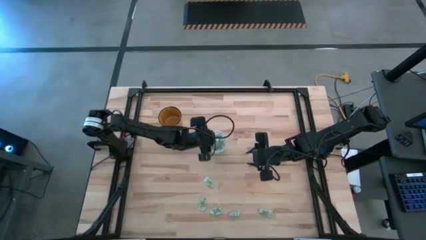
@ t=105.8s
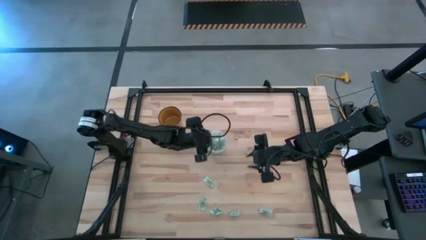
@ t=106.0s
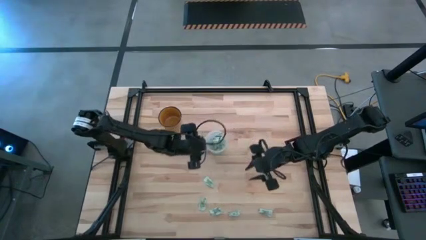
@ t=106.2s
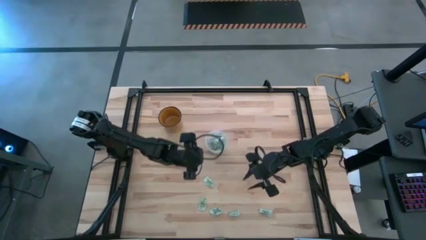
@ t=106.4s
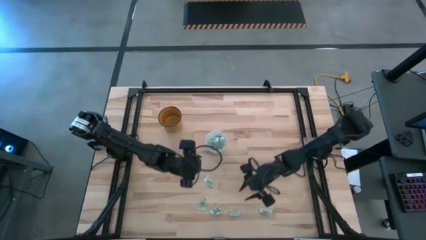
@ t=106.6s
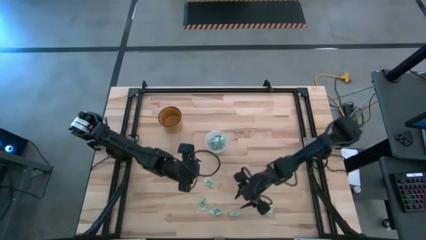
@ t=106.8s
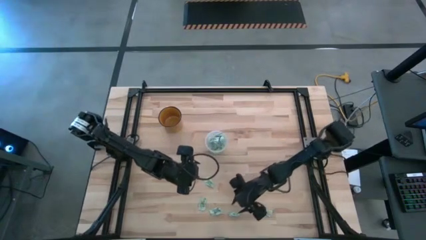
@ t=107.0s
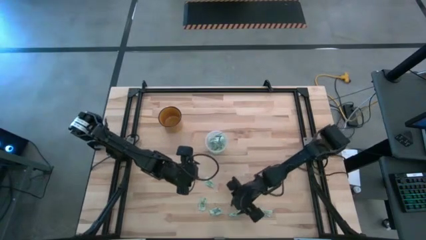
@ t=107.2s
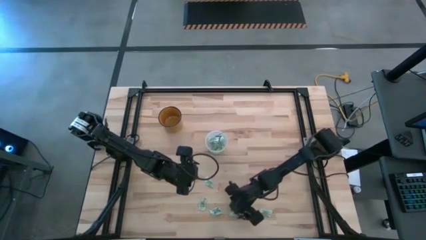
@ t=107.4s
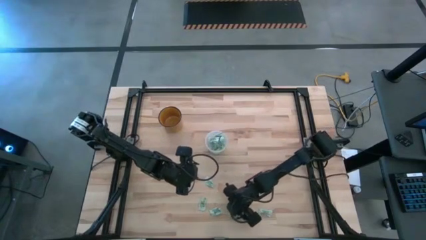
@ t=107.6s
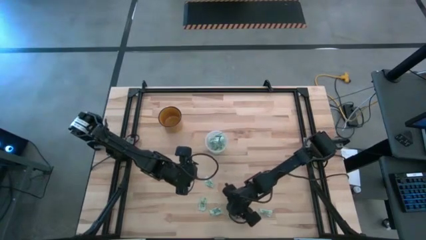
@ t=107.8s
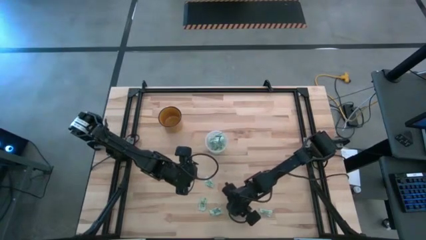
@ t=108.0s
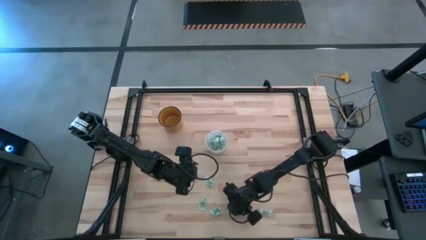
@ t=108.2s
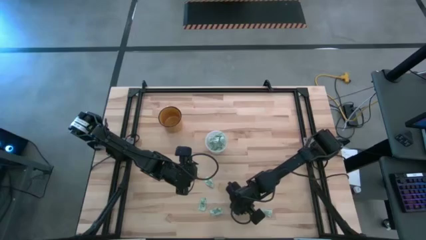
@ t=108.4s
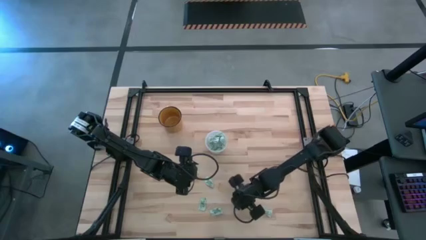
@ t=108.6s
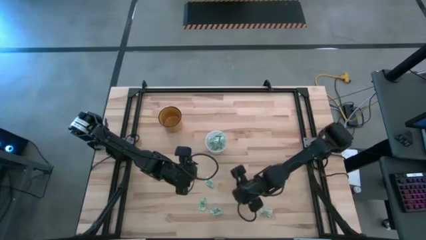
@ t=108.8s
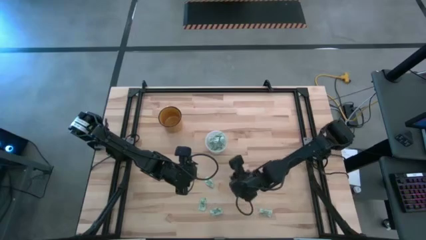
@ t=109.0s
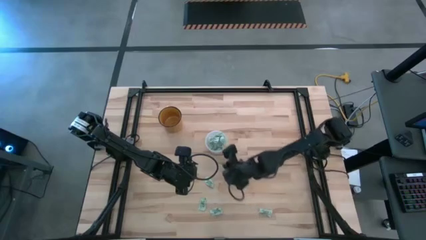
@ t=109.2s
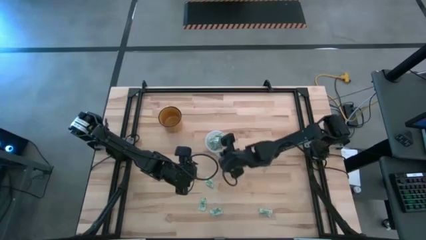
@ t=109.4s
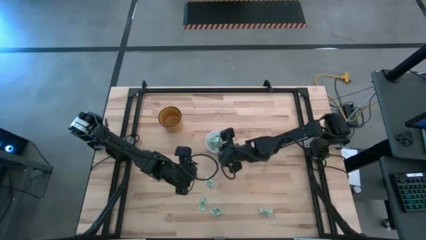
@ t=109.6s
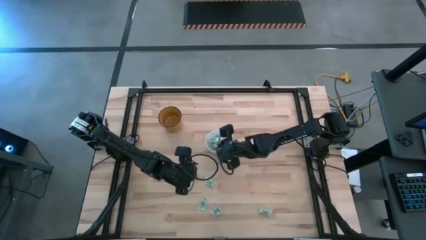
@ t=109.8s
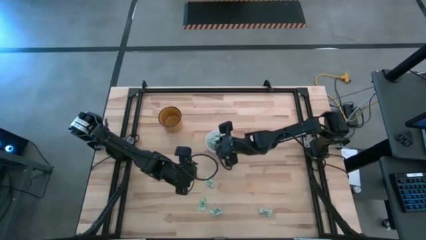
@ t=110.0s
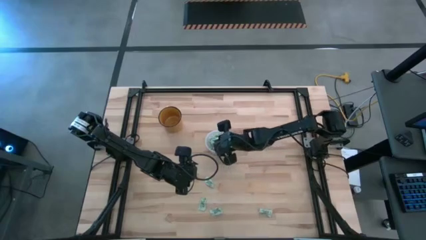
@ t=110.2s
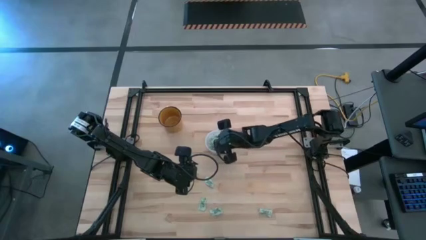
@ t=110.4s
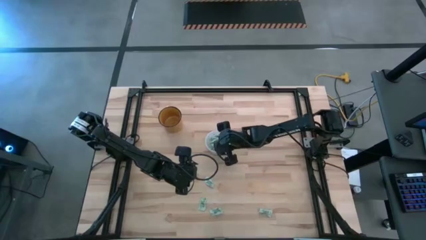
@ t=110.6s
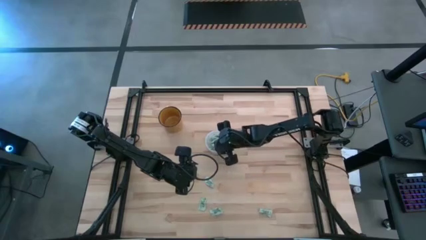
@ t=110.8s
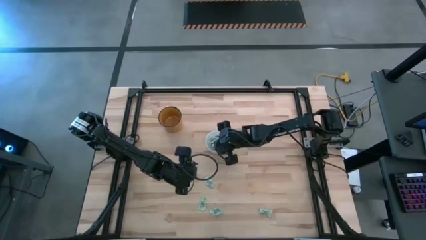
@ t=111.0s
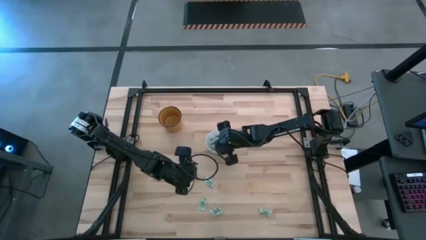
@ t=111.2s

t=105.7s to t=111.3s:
Task: Pick and place Stevia / Truvia into bins
Put the stevia packet into the transparent container

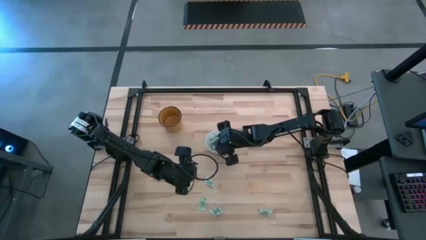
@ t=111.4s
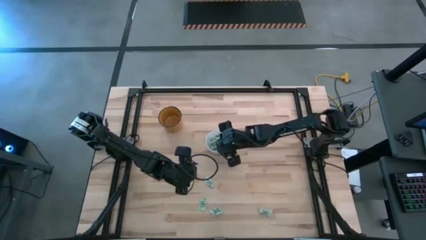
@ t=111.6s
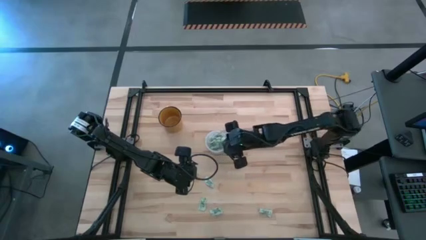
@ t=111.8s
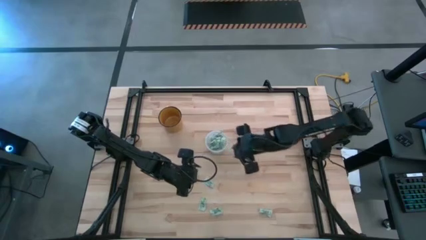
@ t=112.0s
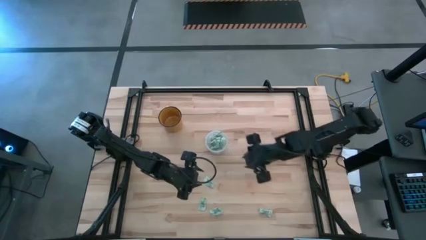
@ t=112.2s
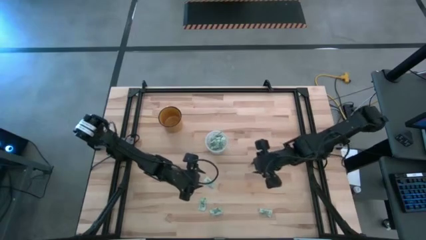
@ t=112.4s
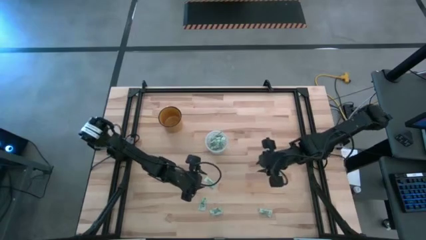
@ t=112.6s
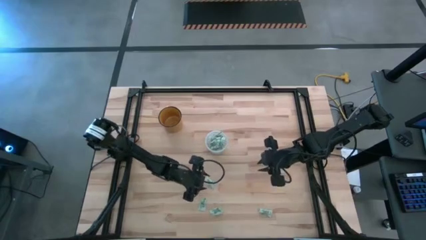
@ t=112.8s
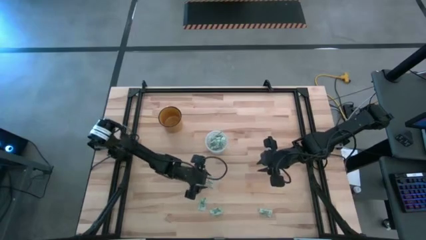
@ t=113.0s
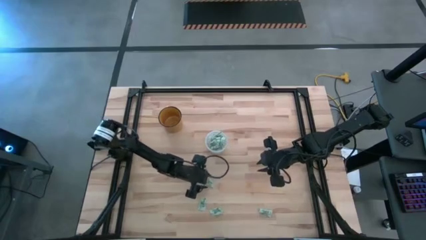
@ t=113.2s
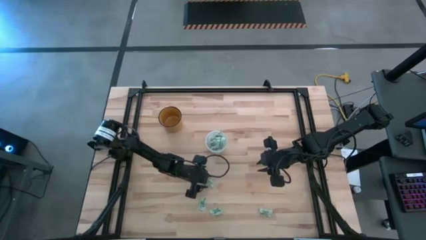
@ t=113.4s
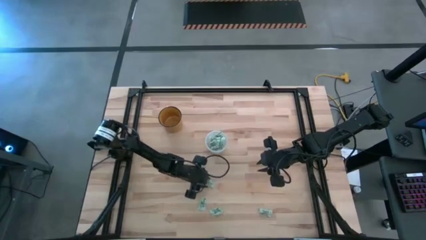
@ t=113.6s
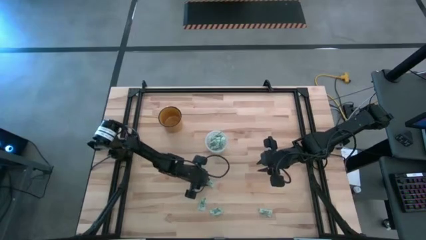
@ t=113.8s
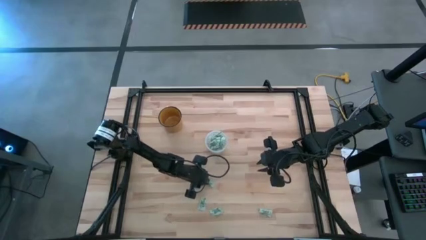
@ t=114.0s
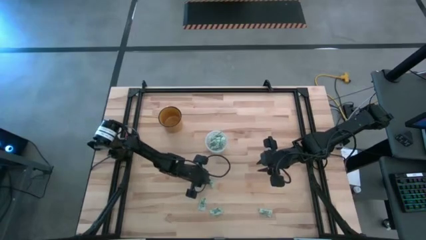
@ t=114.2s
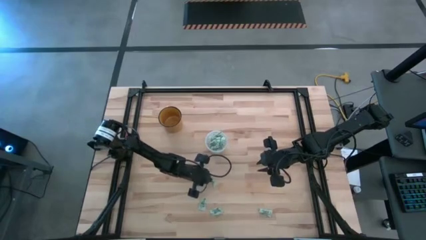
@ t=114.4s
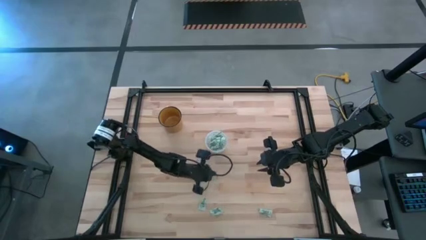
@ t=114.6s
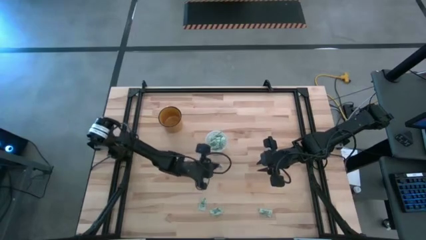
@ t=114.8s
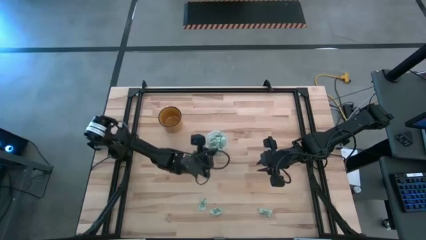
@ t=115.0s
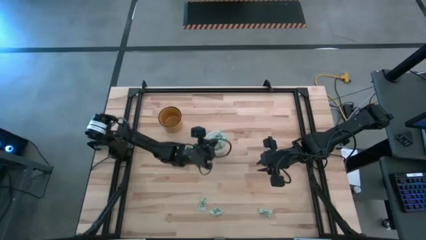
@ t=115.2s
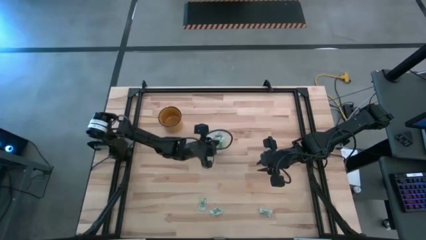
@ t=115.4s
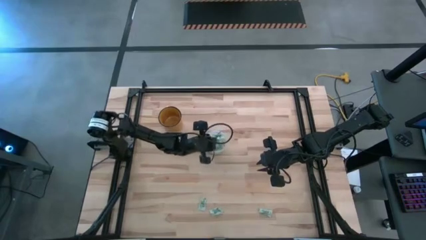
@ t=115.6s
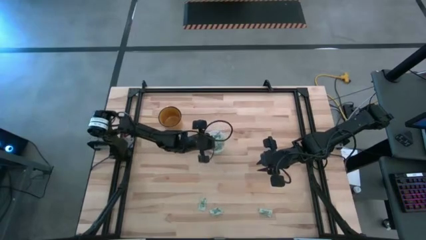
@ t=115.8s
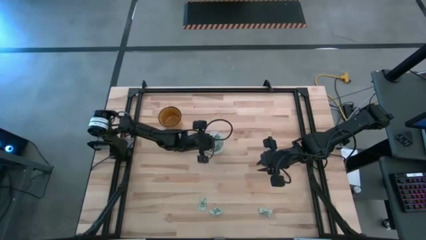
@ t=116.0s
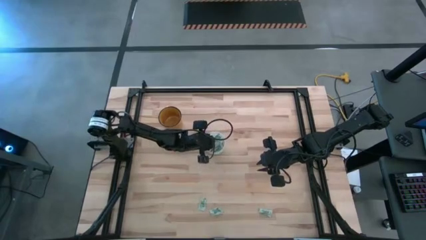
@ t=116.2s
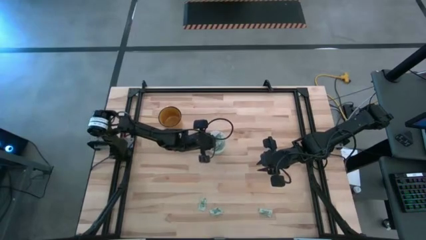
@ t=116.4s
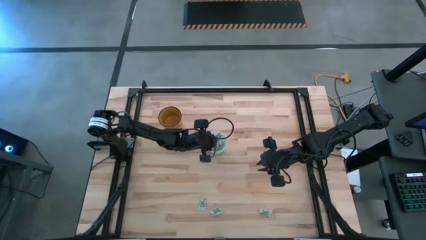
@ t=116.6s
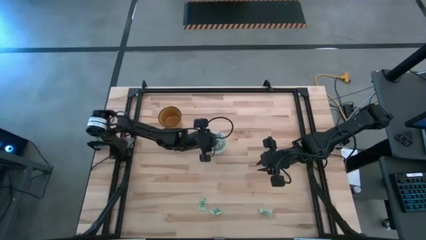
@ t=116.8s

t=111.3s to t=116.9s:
Put the stevia packet into the transparent container

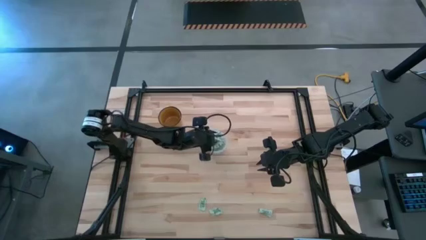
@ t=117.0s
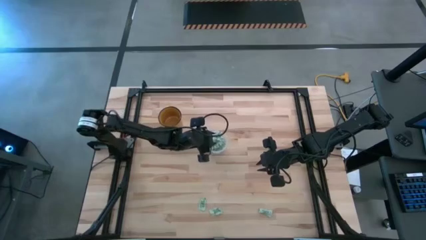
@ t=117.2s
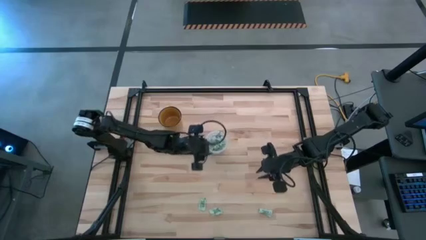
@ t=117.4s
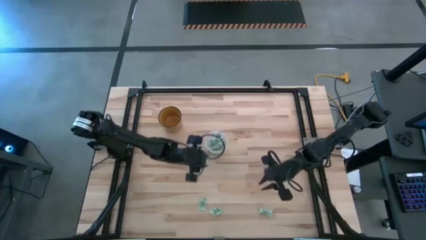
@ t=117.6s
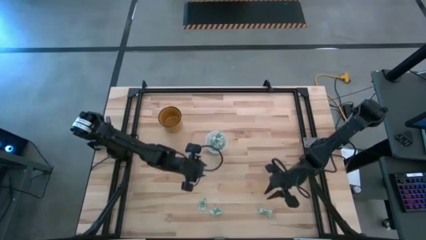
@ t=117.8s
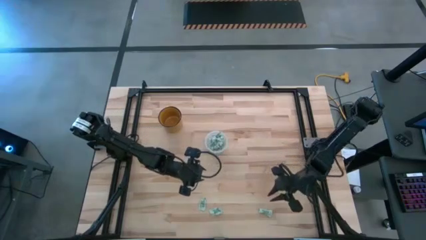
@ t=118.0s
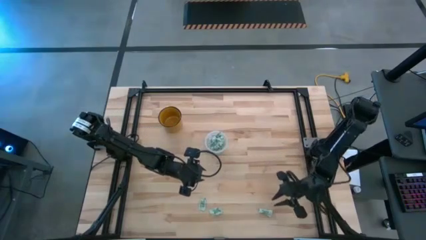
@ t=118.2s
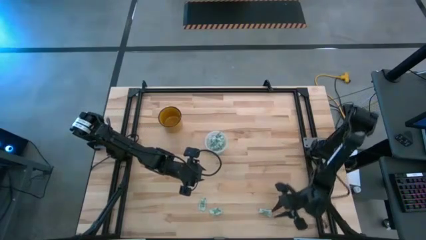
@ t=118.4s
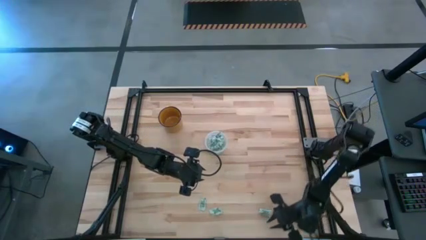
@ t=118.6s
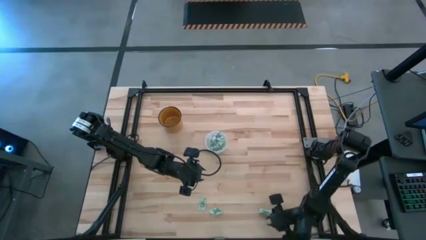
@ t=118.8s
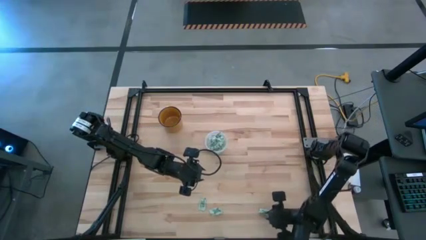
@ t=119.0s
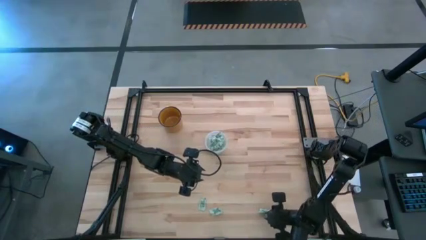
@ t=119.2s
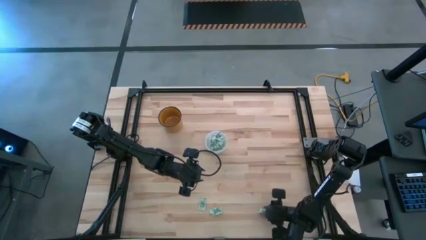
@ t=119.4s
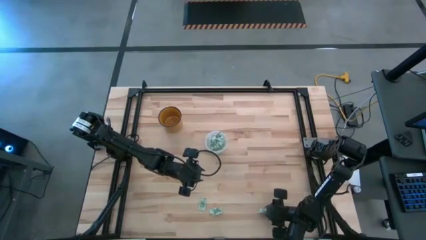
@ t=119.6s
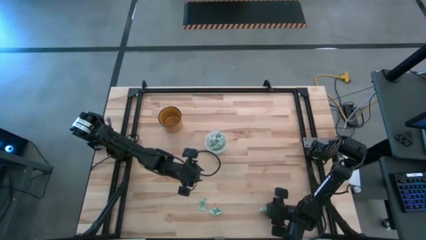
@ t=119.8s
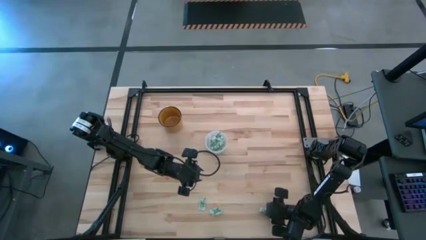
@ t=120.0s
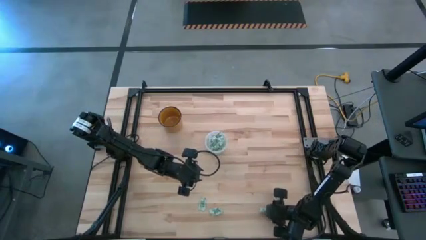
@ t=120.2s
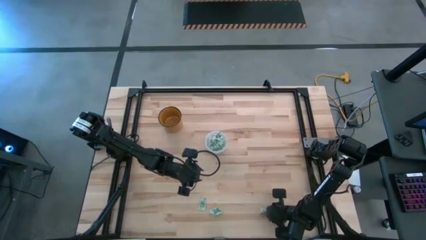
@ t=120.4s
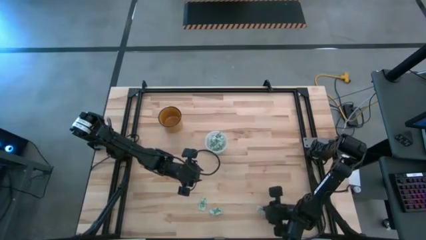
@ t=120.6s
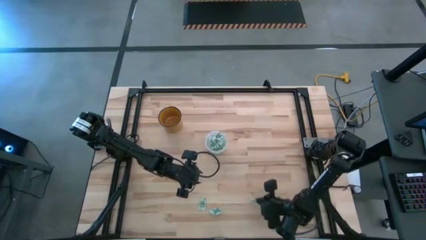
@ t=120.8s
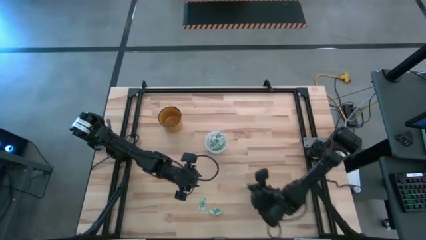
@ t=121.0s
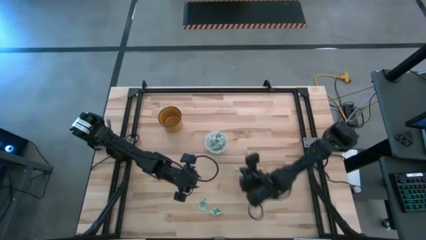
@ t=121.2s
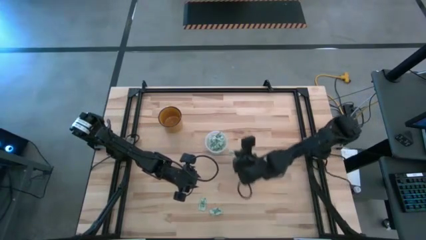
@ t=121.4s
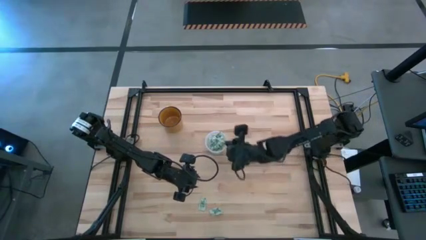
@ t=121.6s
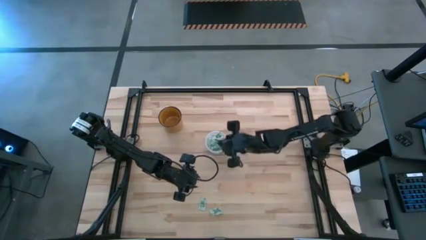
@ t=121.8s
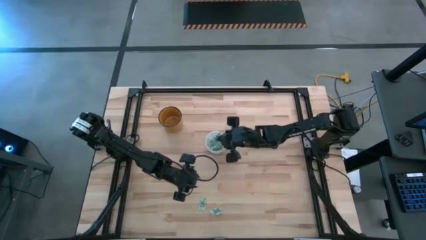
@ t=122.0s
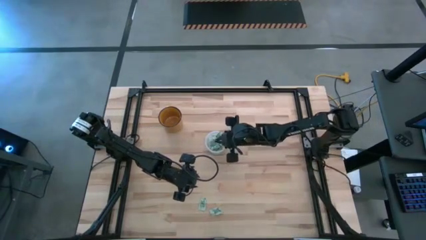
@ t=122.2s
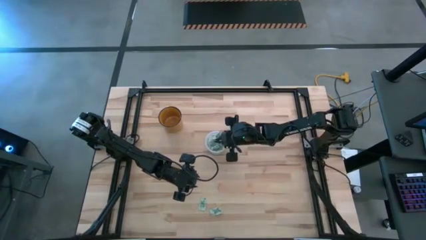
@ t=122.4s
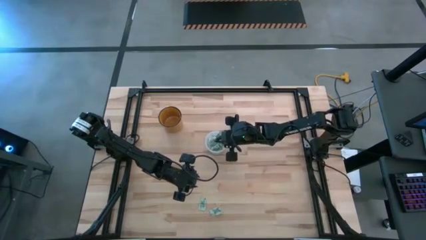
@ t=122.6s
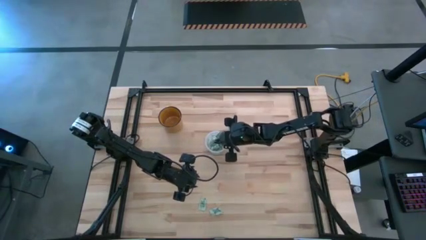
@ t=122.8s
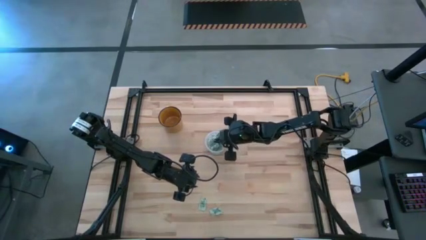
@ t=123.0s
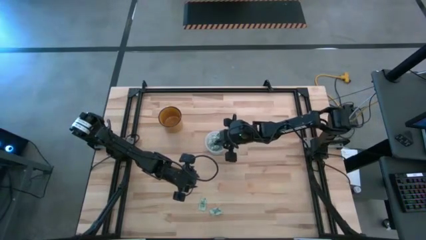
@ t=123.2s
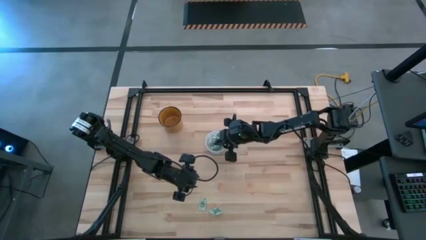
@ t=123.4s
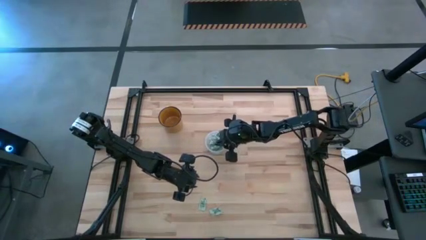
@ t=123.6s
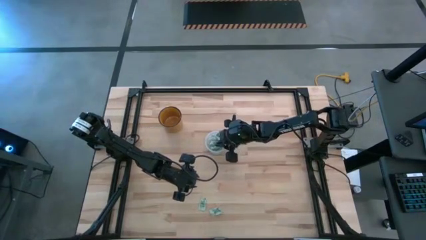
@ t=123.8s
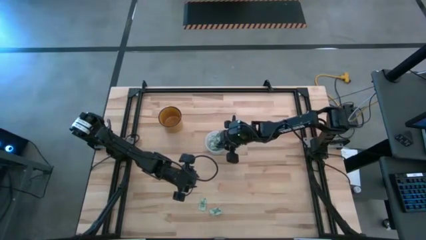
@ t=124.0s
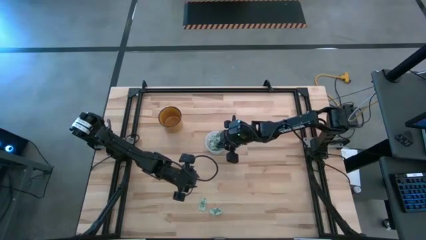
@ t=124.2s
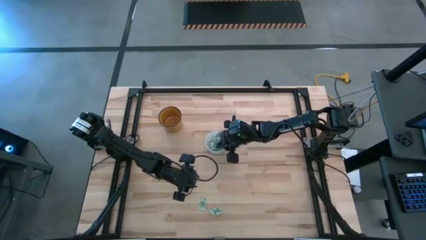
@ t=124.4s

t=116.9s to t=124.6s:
Put the right stevia packet into the transparent container
